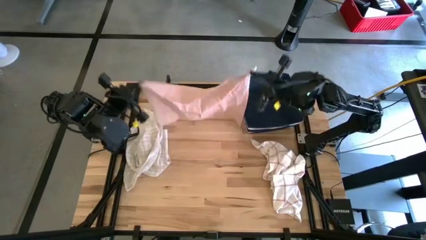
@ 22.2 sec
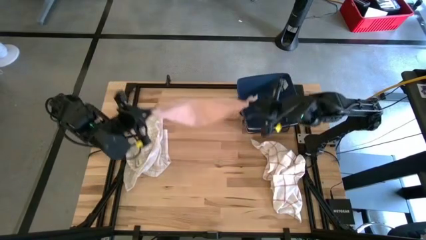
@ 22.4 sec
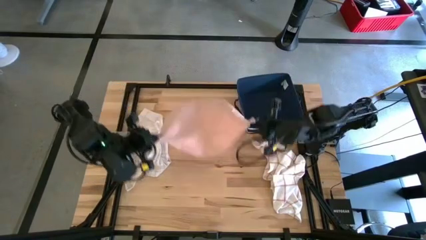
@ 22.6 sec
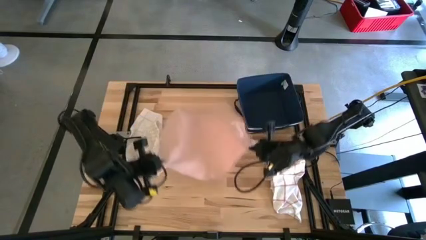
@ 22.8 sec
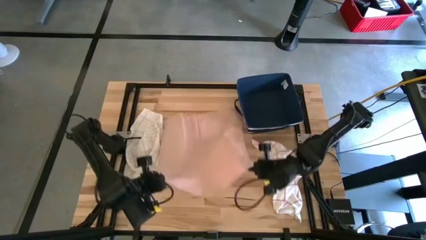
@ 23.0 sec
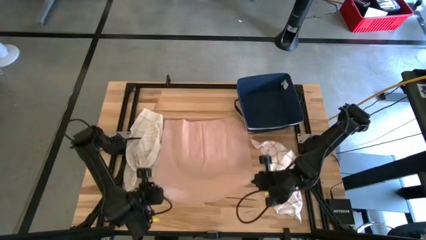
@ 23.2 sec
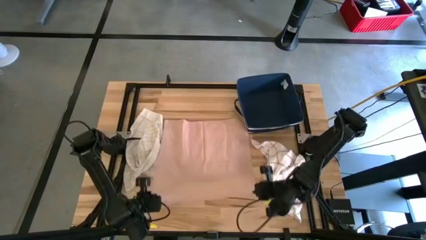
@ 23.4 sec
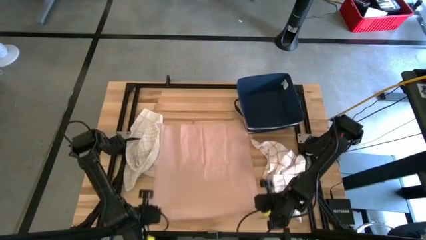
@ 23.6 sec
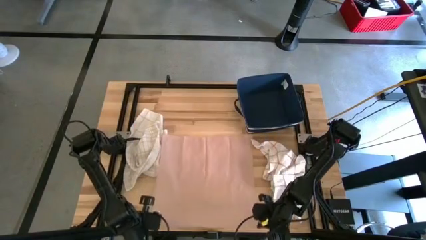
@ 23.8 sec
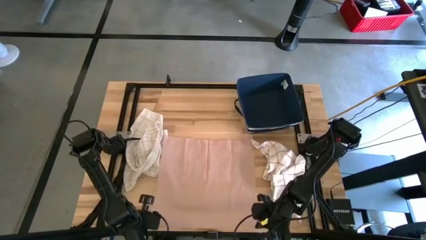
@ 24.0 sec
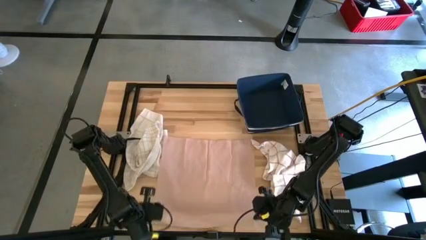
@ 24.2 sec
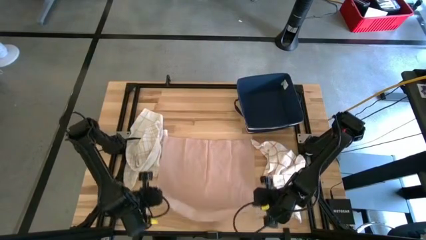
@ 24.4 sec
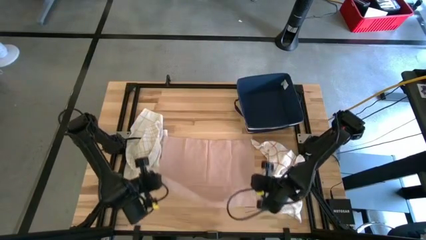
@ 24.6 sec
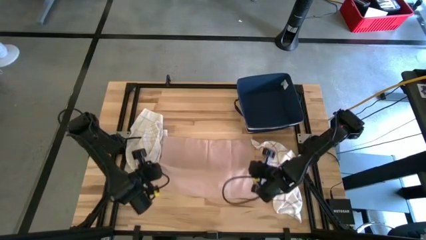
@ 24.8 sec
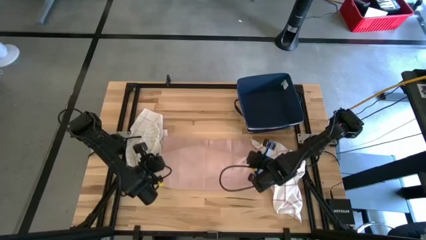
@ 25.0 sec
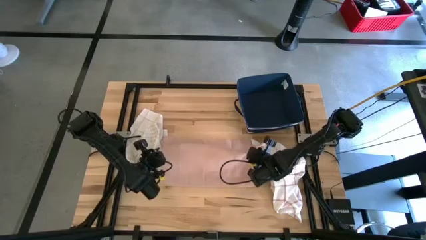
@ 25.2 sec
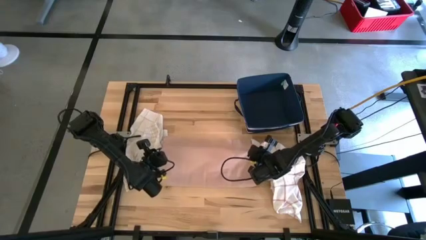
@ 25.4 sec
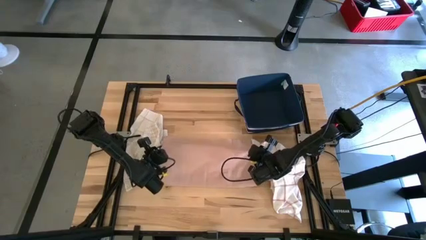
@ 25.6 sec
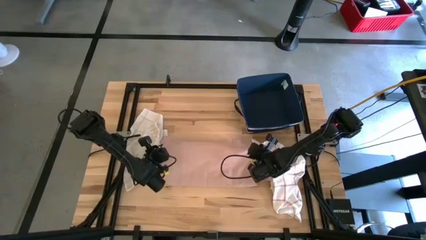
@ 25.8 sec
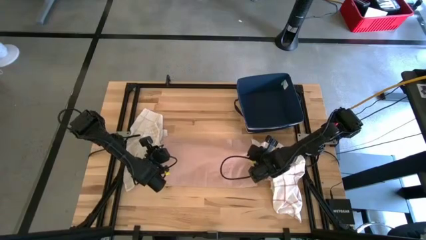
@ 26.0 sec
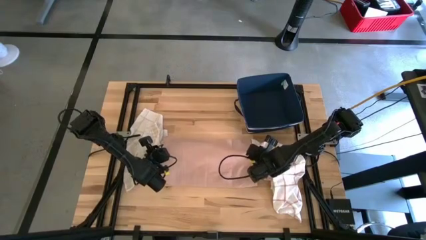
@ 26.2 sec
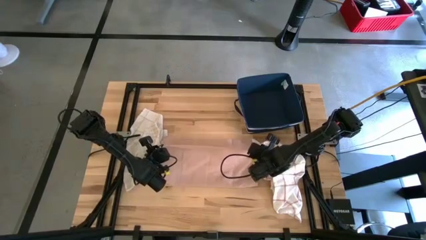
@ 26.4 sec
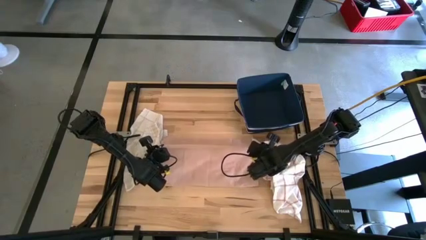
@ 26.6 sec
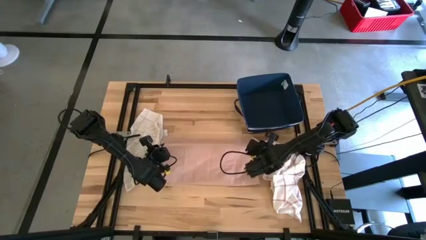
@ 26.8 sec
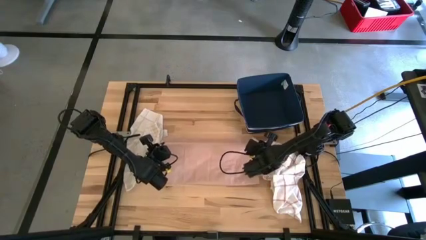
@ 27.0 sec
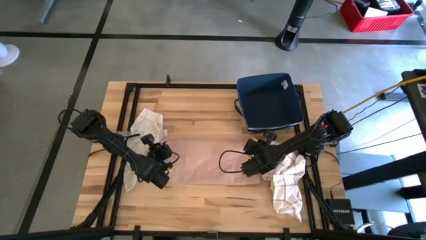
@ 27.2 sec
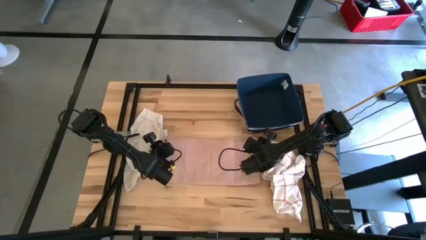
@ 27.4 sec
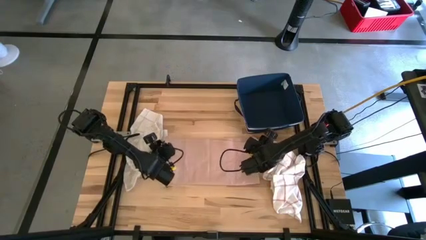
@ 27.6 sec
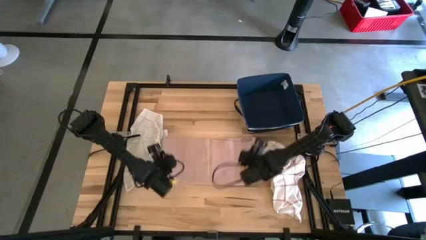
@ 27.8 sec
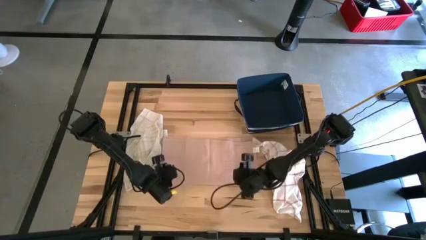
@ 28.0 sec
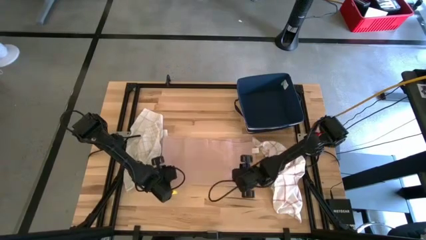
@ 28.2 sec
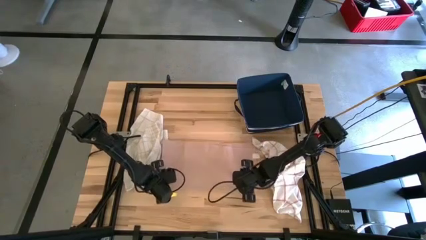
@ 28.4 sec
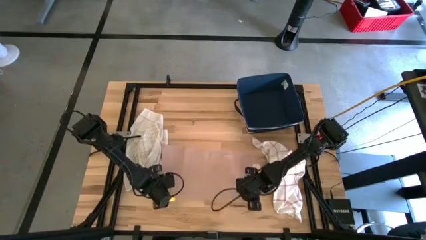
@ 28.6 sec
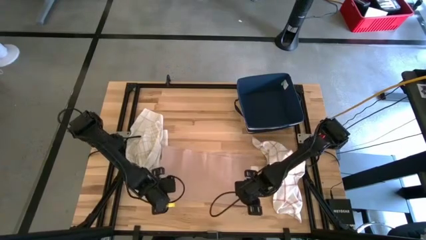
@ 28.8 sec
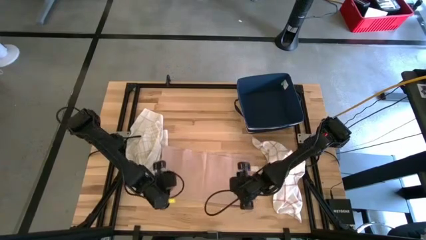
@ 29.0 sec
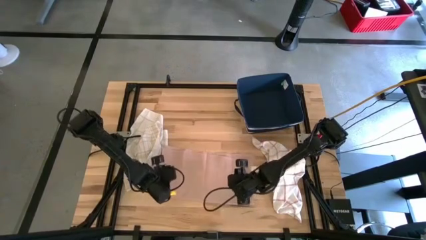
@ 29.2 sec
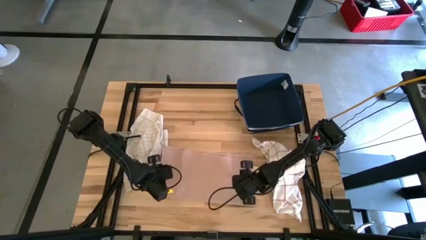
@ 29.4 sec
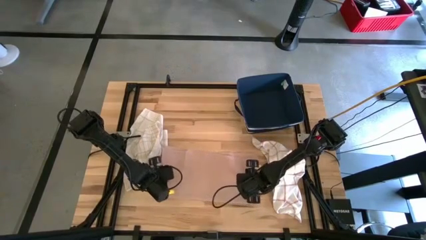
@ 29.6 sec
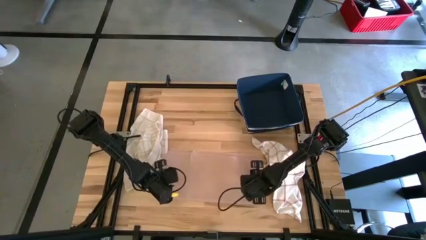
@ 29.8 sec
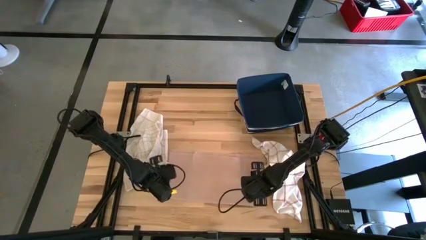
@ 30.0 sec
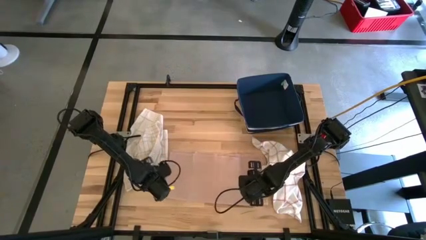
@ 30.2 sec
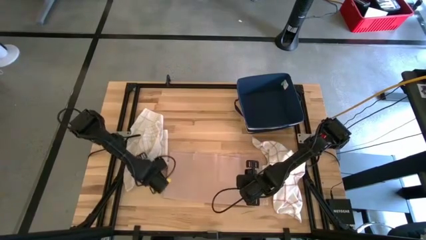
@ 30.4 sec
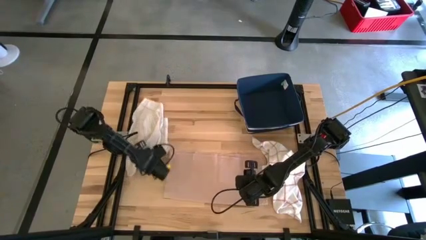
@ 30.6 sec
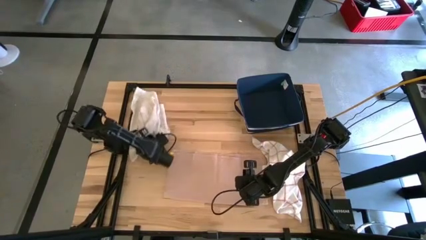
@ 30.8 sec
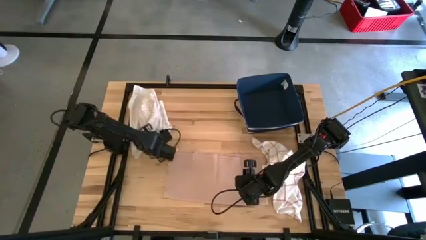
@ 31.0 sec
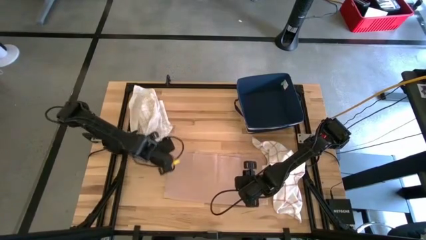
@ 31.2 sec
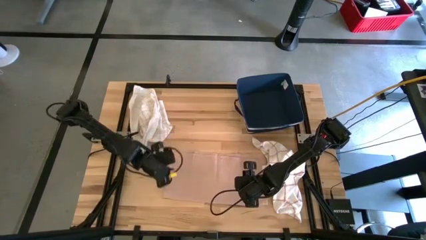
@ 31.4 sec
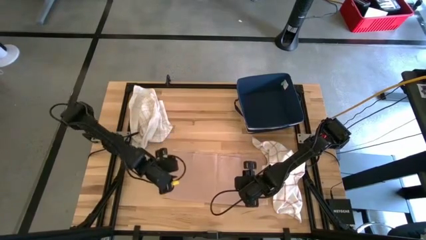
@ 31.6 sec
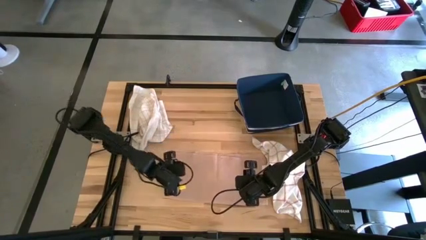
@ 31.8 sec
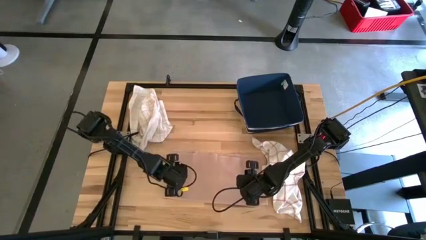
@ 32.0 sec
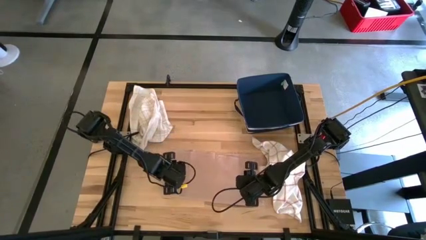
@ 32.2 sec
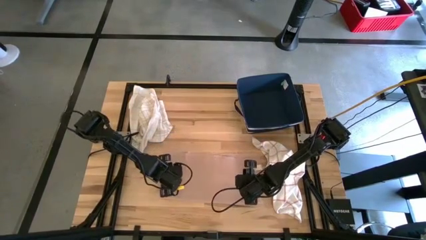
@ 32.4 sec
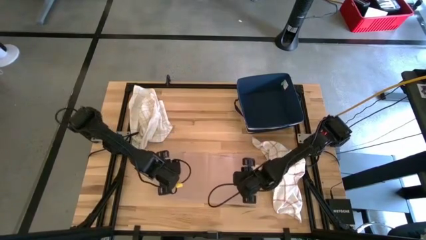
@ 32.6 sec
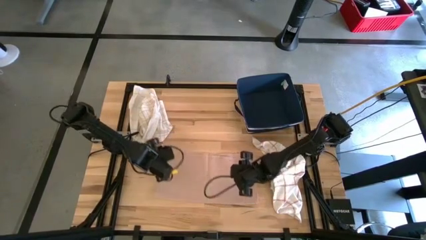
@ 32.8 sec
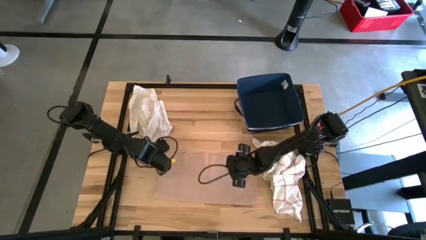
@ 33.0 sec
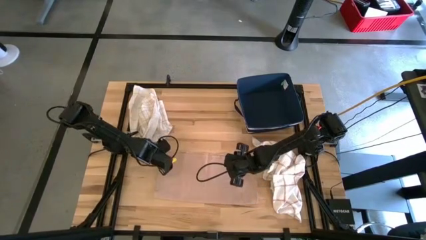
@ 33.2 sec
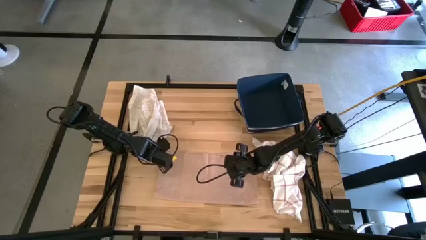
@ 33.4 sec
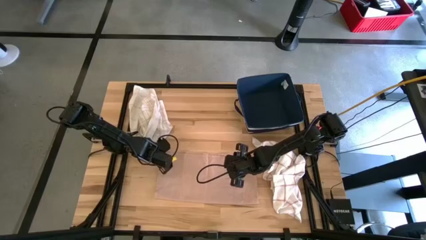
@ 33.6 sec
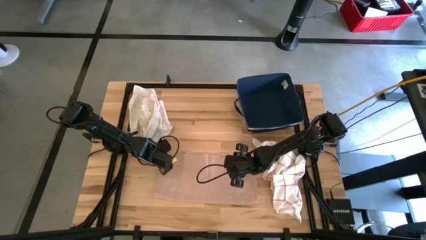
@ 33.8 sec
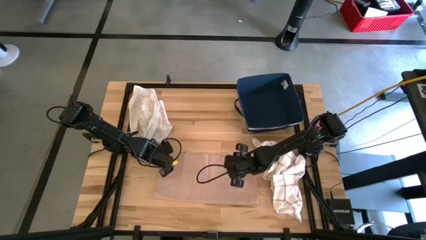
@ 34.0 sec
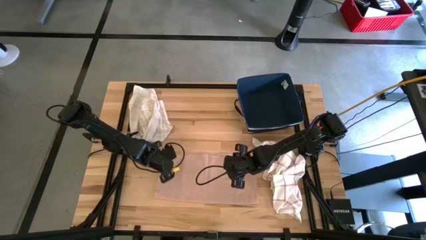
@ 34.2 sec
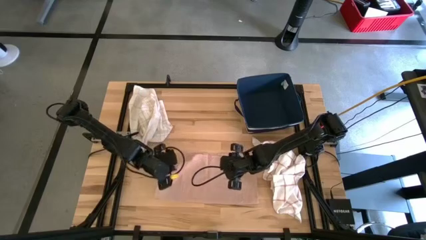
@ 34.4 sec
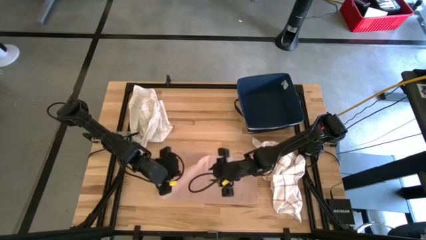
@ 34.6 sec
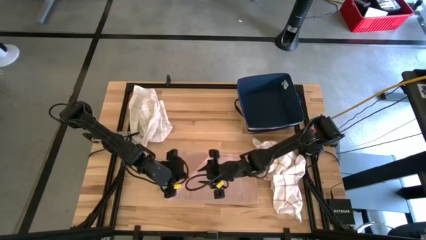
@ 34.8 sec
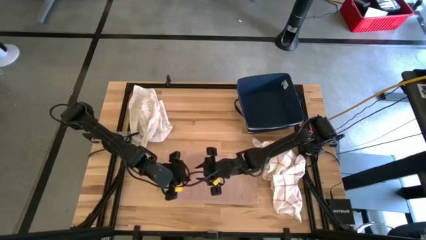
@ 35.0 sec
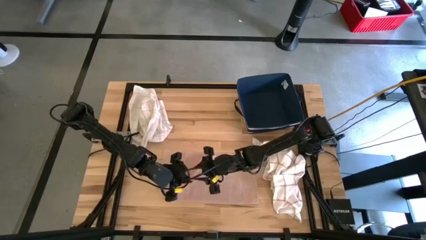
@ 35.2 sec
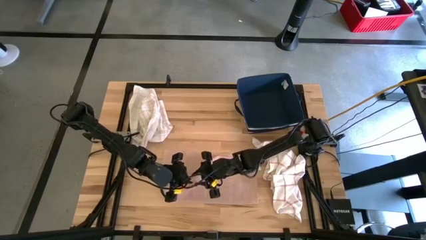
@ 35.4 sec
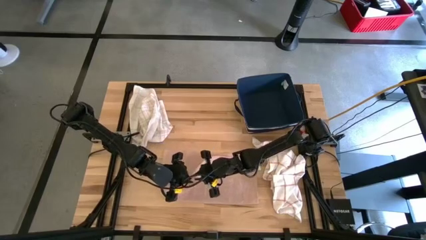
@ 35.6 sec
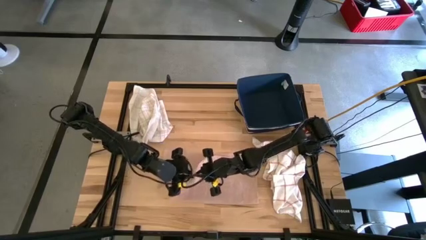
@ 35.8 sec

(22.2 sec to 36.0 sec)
Task: Fold towel
Fold the pink towel

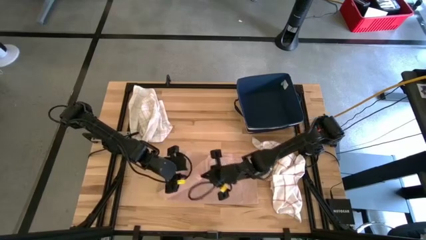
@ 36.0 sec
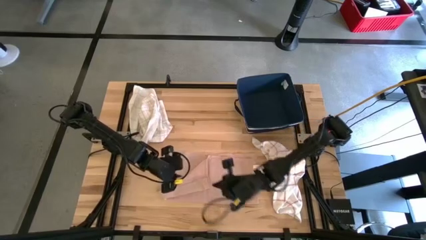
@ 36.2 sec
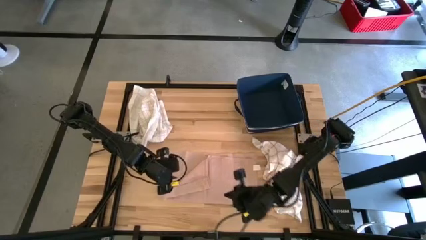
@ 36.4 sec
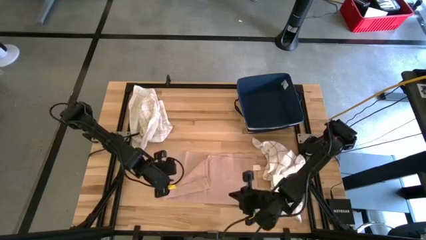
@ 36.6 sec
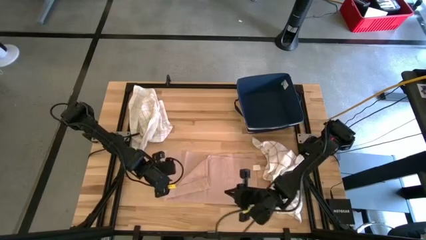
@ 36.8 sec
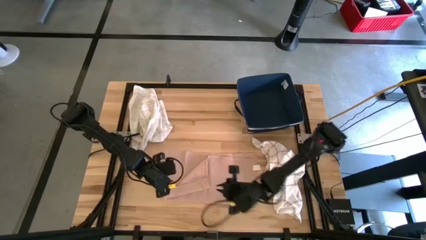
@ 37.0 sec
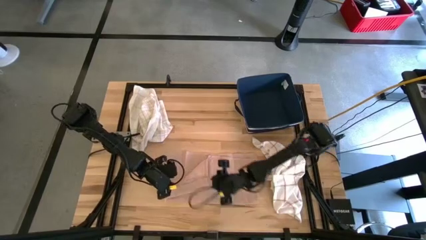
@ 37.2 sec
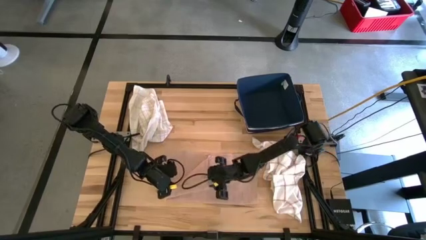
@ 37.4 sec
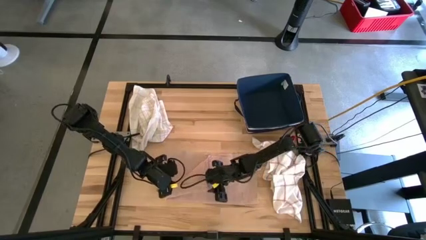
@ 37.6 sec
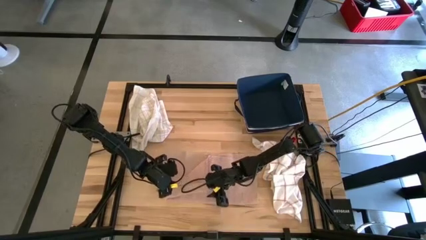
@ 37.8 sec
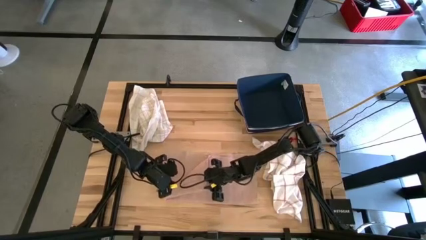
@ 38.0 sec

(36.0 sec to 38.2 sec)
Fold the pink towel
